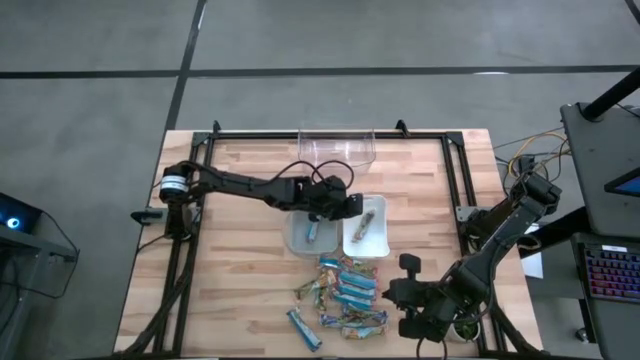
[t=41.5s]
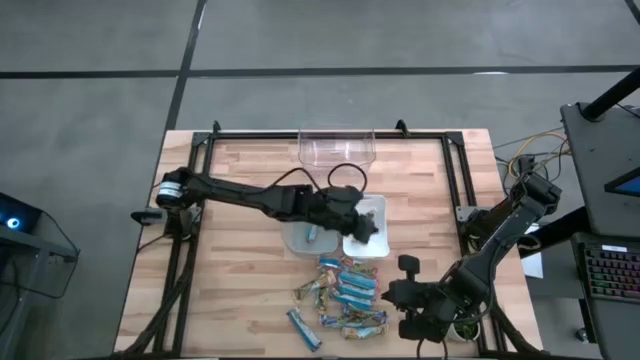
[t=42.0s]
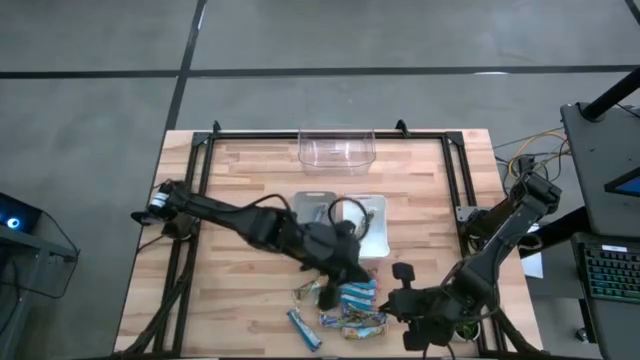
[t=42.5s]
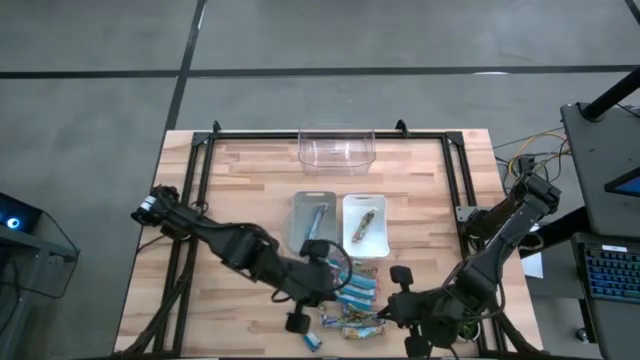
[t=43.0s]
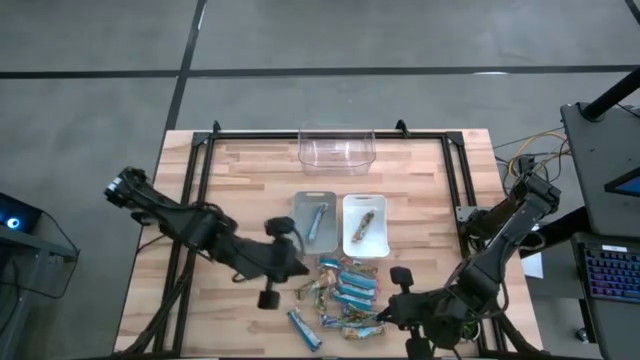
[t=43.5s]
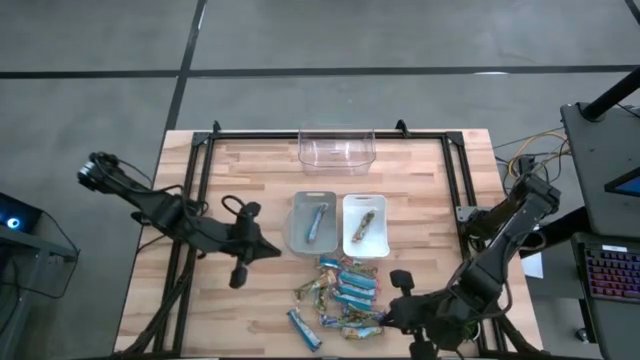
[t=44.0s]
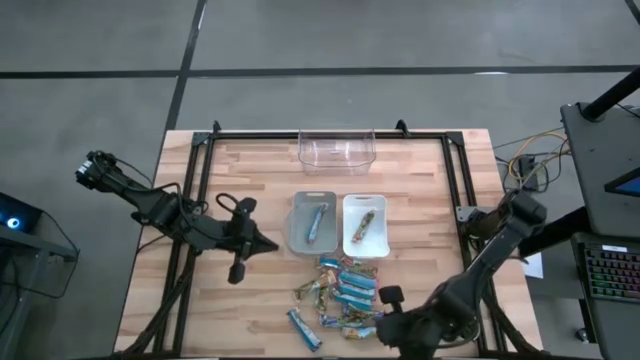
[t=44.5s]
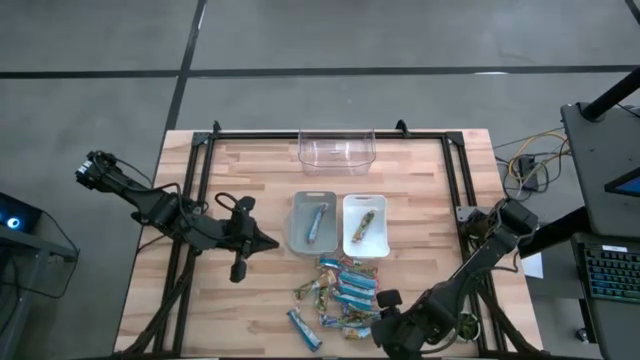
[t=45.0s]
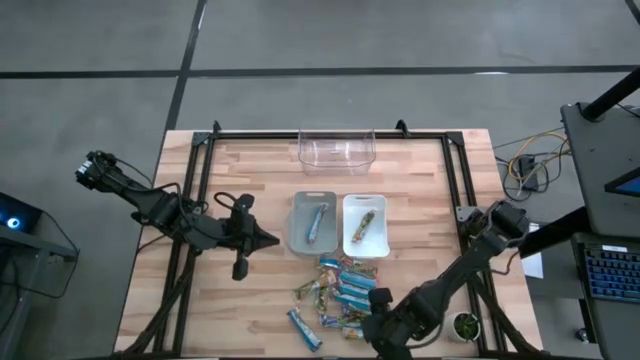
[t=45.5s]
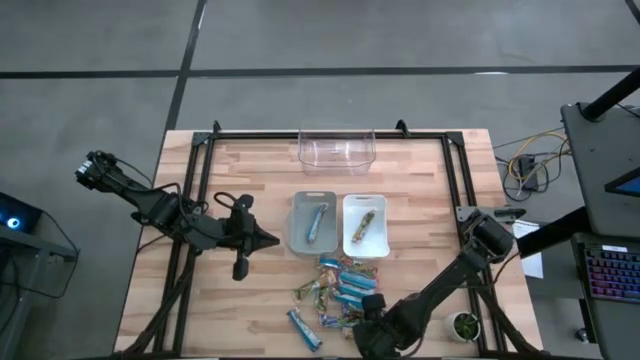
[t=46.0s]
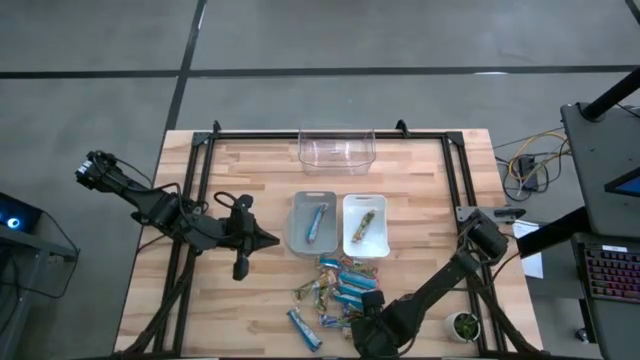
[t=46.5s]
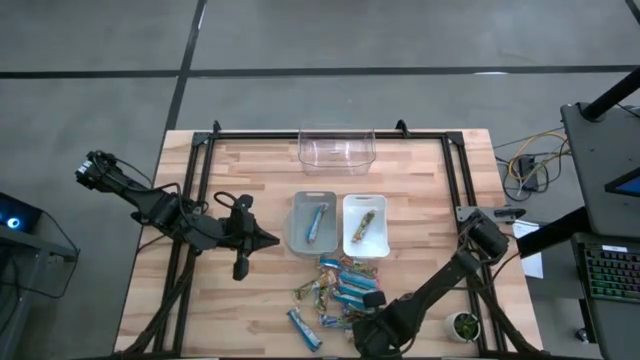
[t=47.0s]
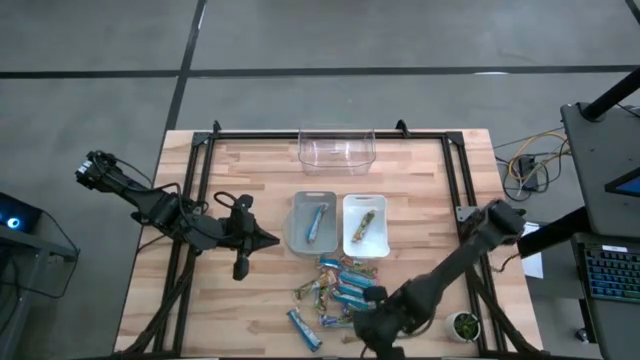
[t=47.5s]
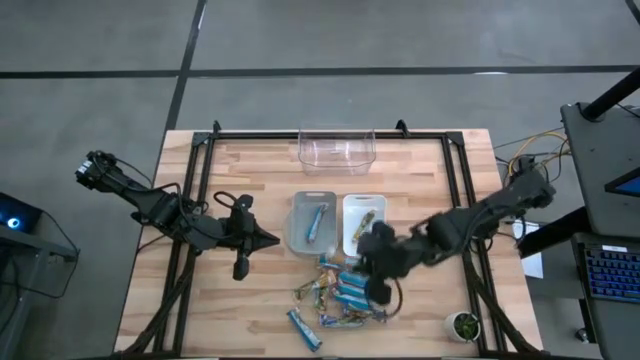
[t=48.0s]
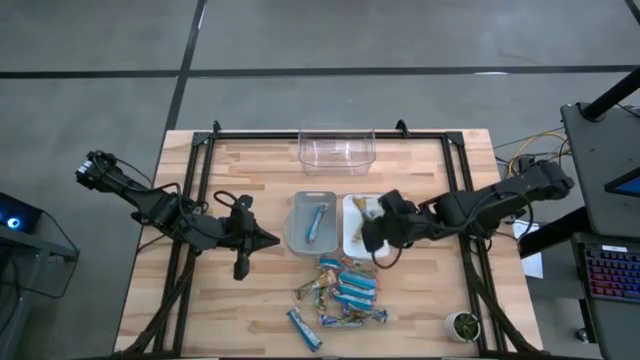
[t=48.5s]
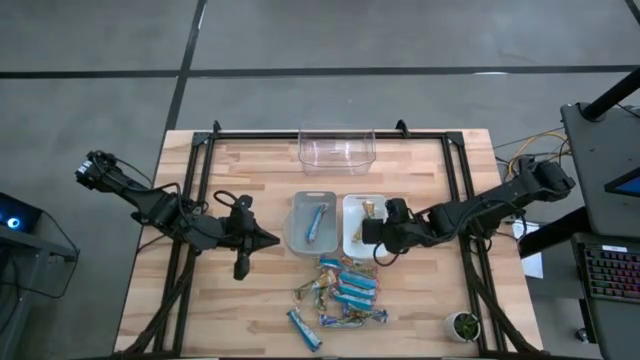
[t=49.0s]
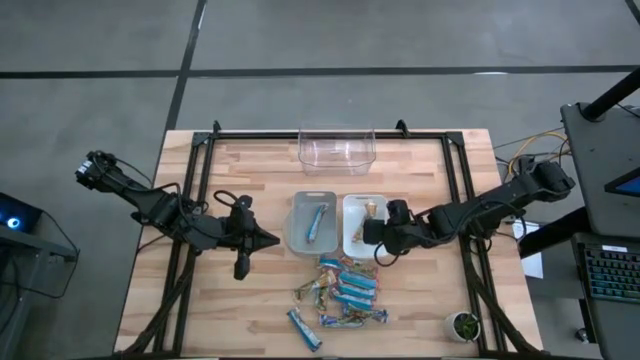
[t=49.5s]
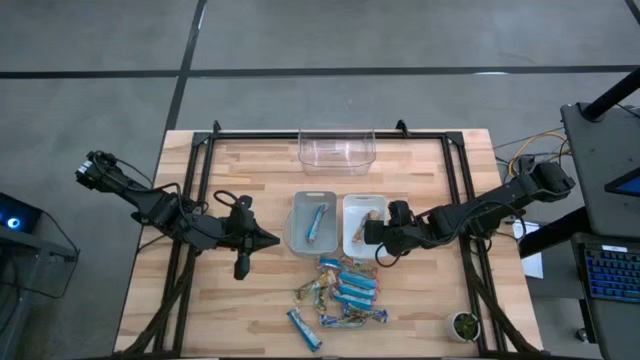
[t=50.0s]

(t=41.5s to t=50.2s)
Task: Pick and place Granola Bars by type
Put the orange granola bar into the white bin

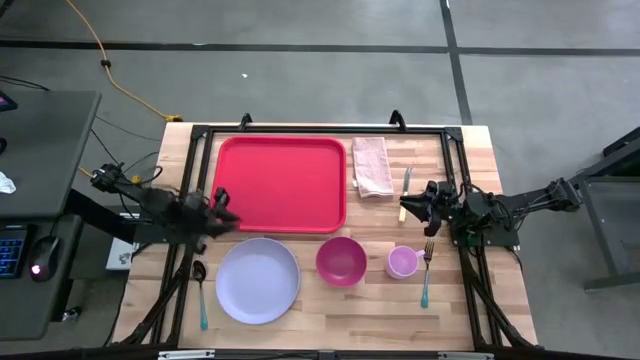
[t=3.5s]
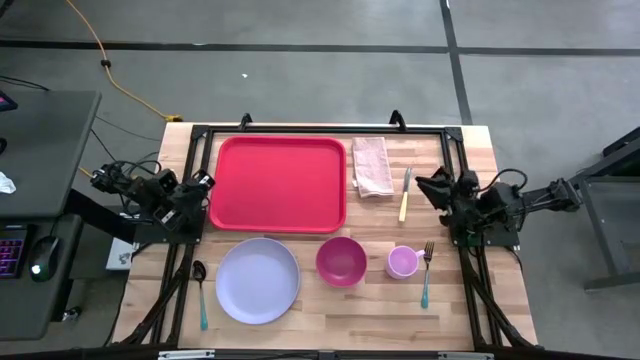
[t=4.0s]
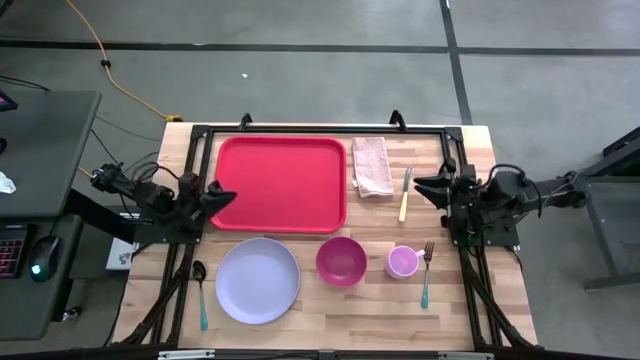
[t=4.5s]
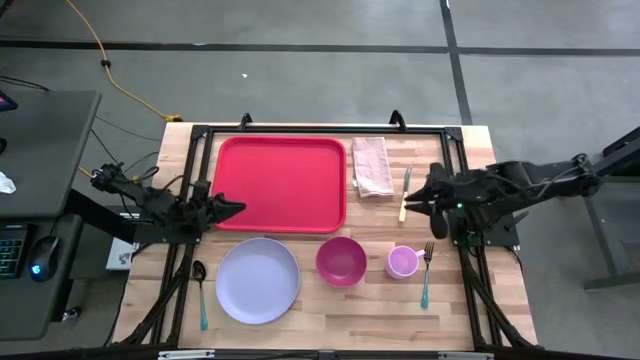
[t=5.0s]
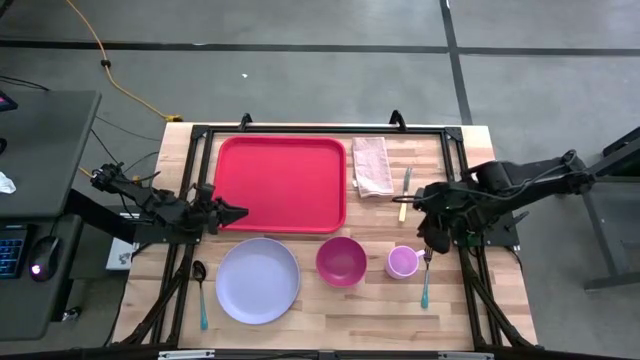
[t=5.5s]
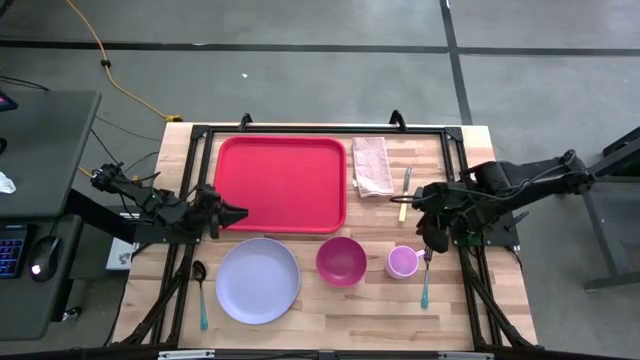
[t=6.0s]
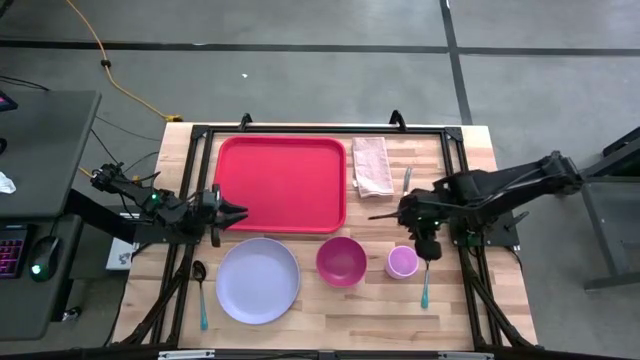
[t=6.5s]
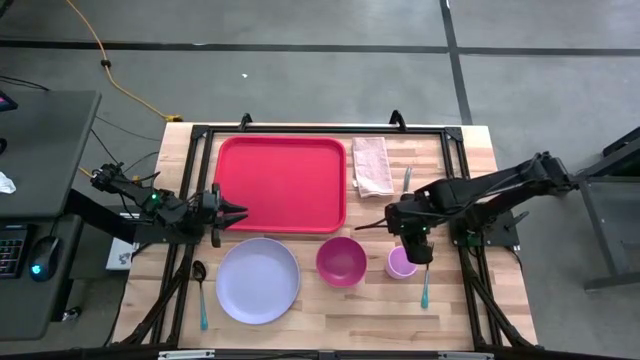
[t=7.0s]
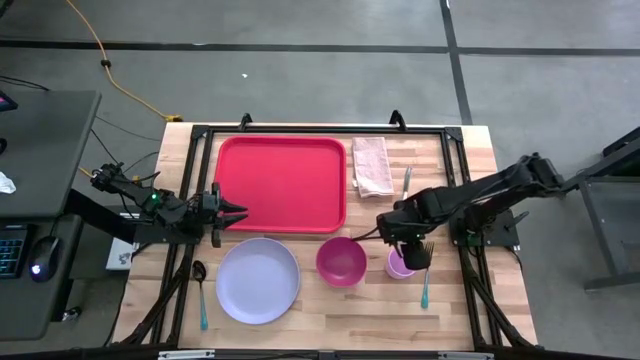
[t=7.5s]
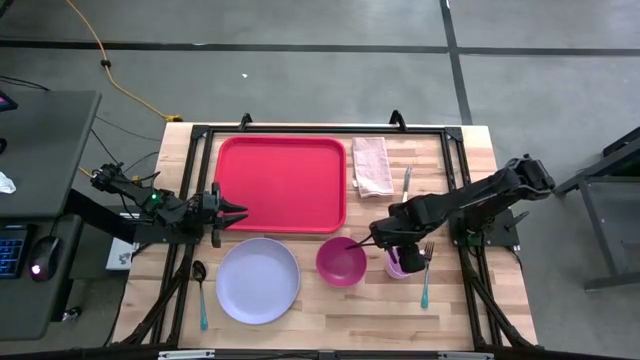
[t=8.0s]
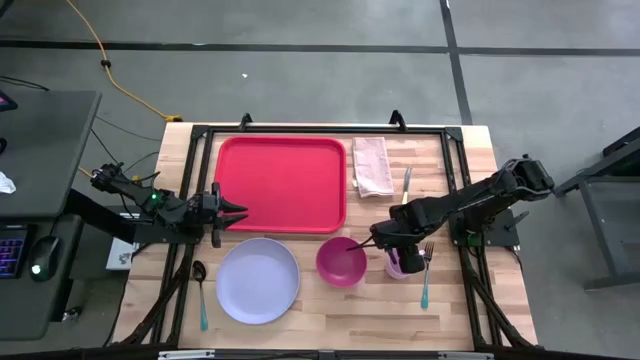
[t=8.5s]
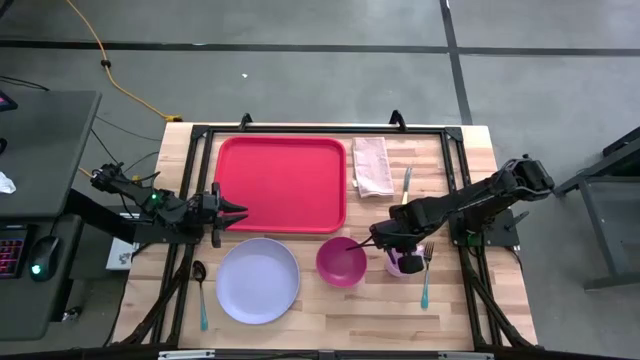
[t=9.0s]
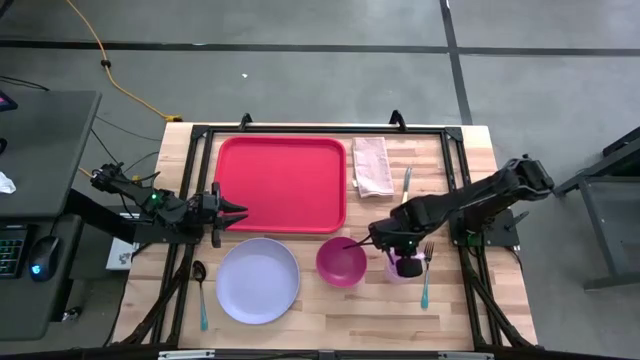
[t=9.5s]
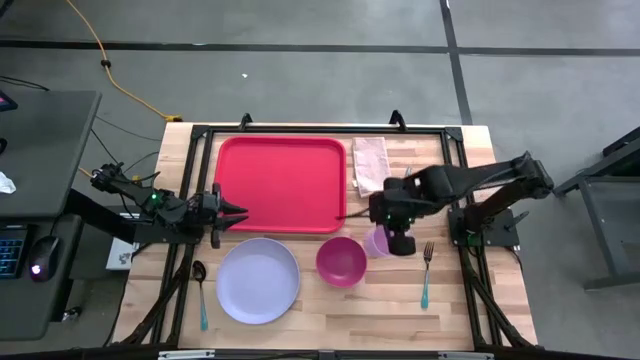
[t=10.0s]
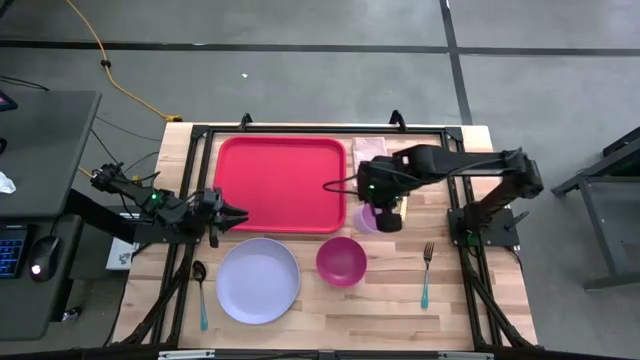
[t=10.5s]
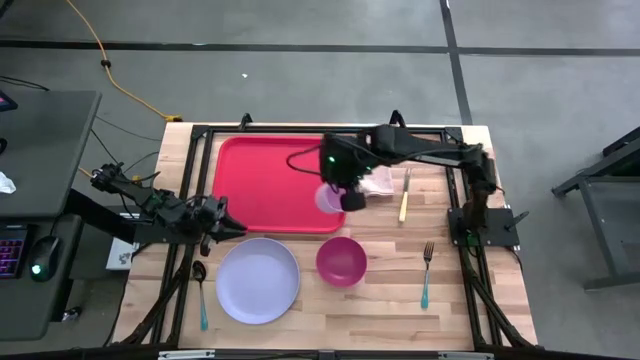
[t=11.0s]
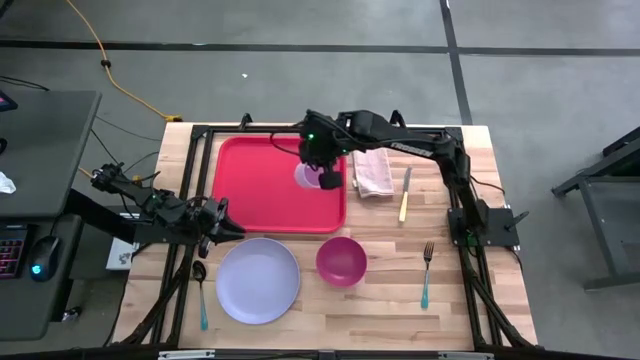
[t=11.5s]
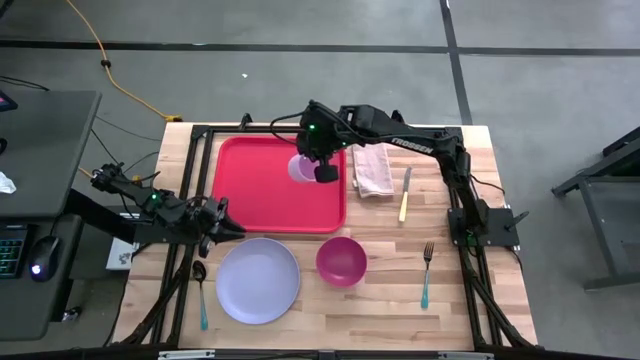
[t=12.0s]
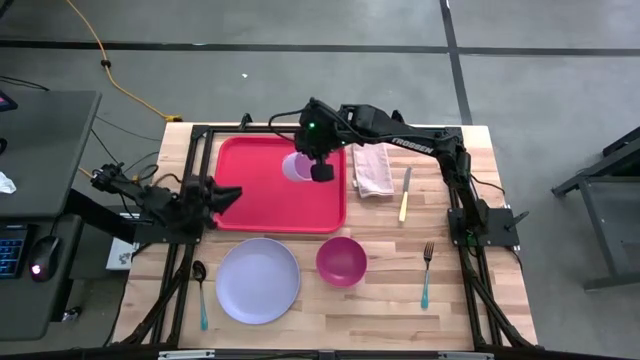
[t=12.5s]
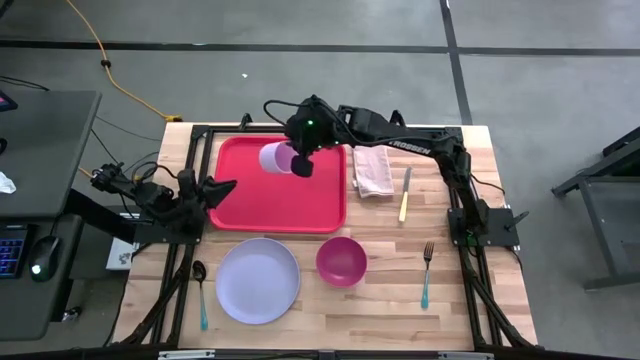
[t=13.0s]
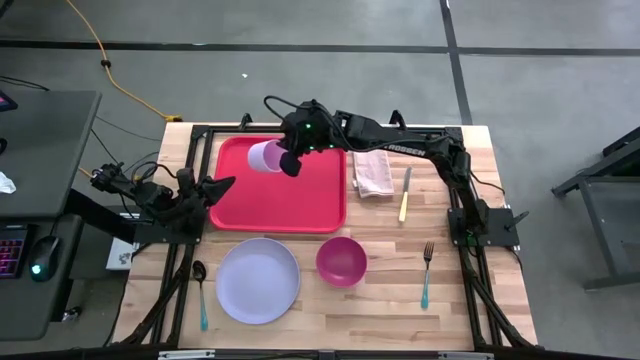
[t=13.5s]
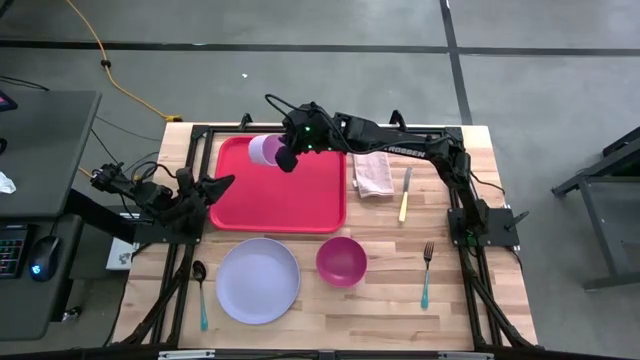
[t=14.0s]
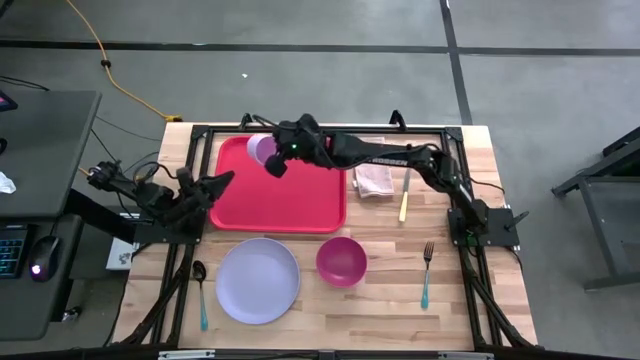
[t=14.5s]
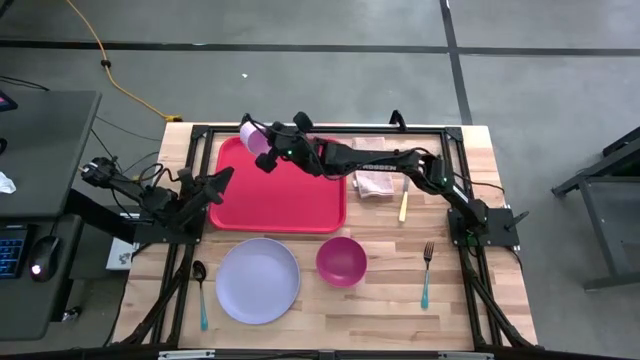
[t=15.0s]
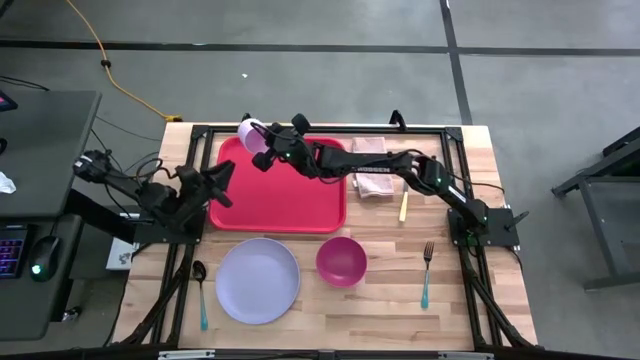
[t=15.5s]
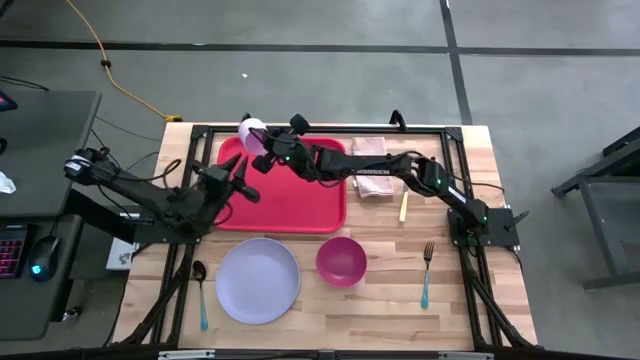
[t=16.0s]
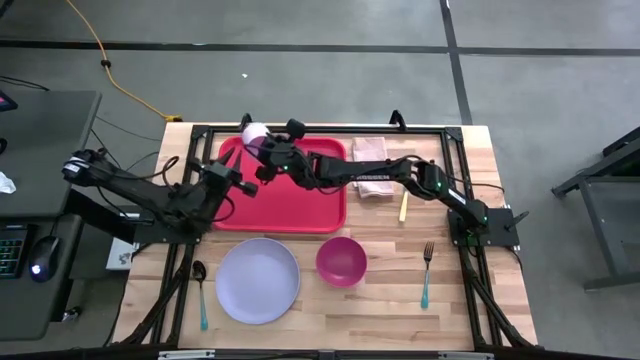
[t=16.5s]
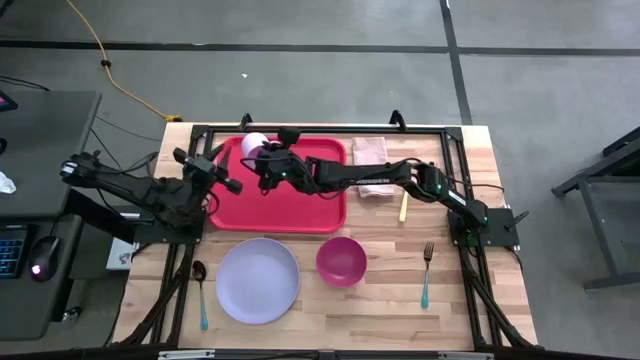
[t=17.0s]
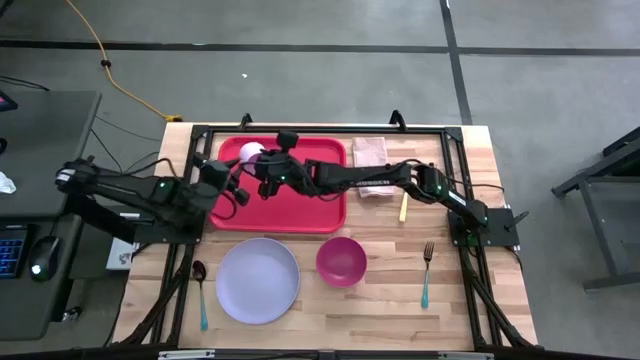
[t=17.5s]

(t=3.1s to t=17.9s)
Task: Set up tray
Put the pink mug on the top left of the red serving tray
